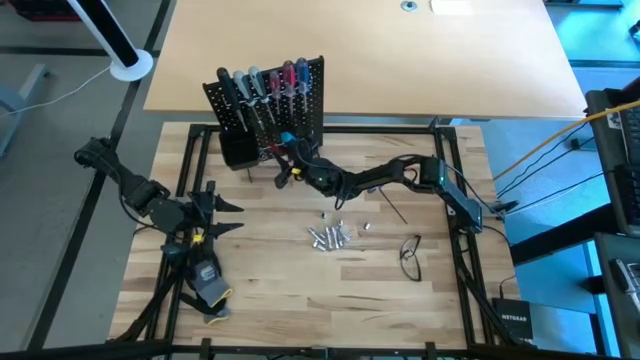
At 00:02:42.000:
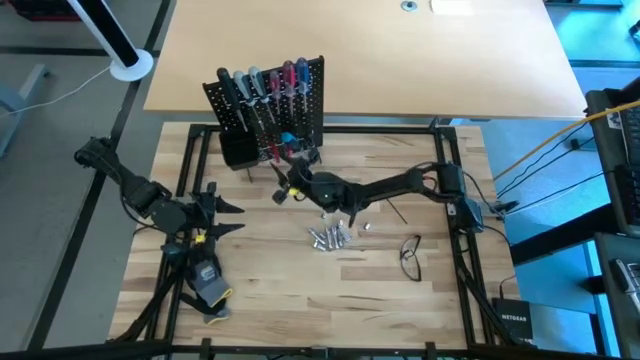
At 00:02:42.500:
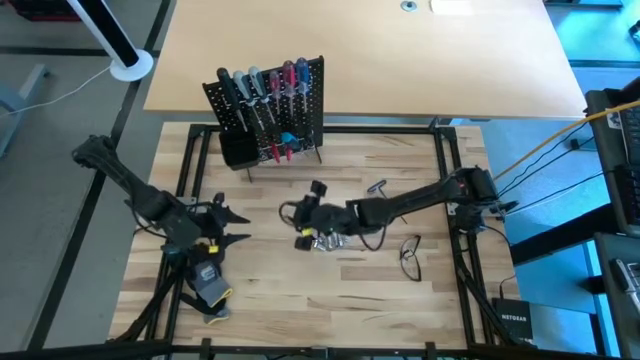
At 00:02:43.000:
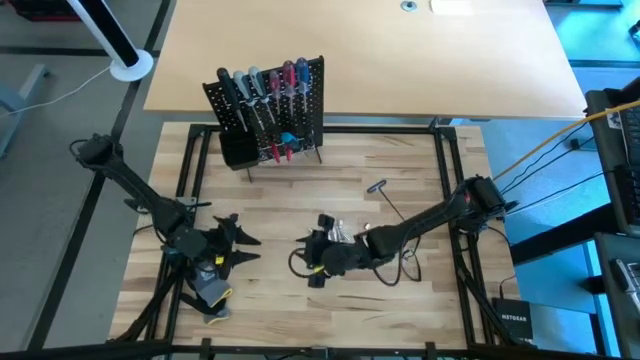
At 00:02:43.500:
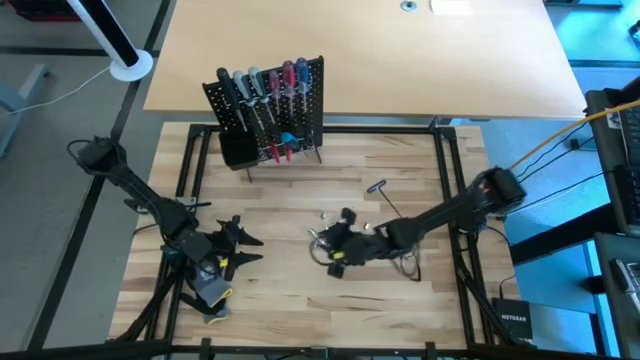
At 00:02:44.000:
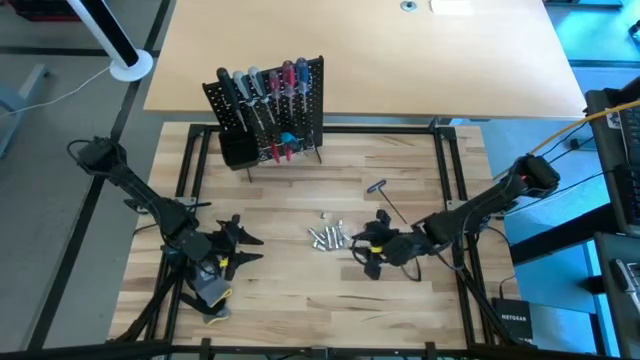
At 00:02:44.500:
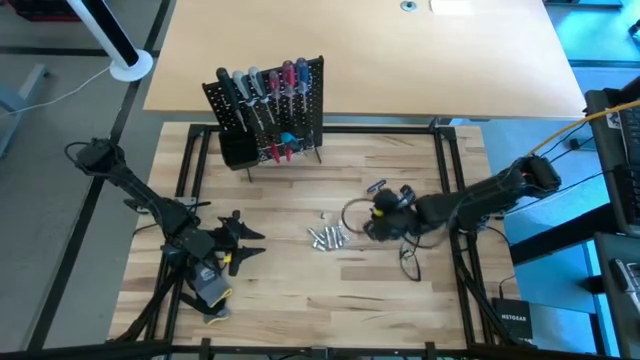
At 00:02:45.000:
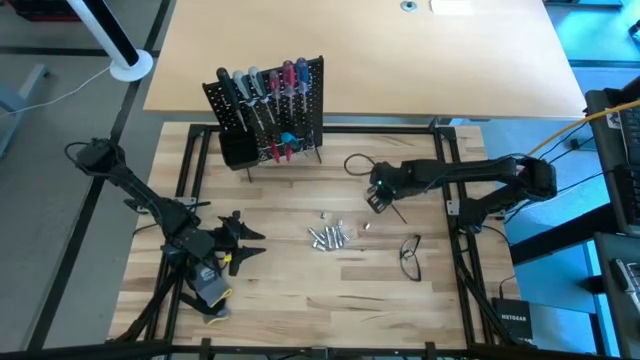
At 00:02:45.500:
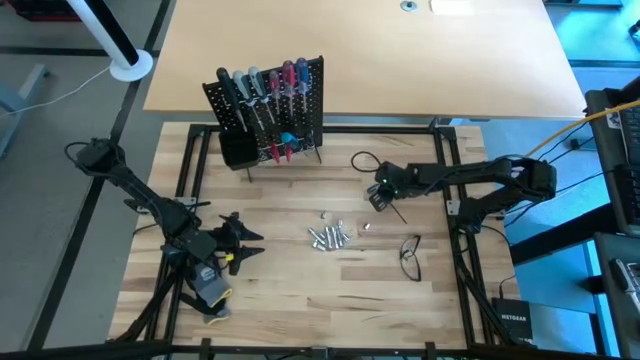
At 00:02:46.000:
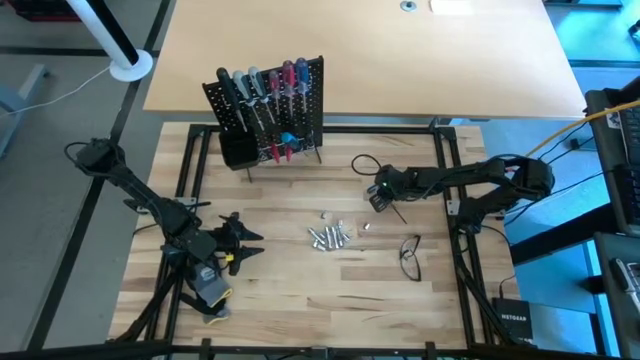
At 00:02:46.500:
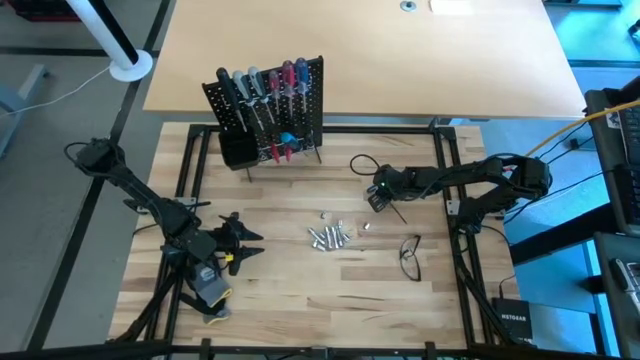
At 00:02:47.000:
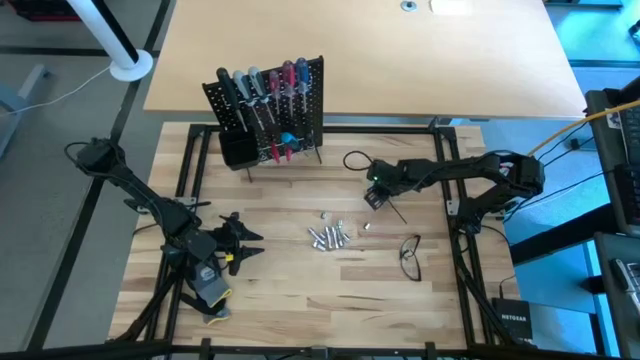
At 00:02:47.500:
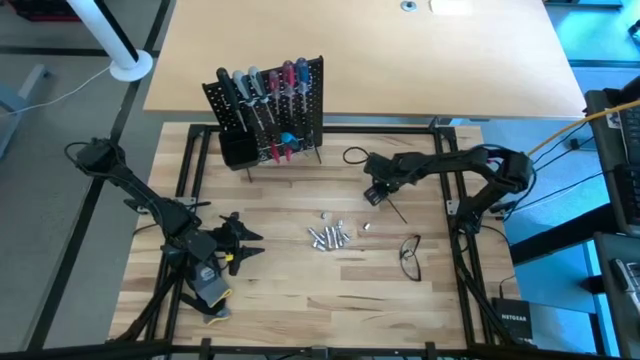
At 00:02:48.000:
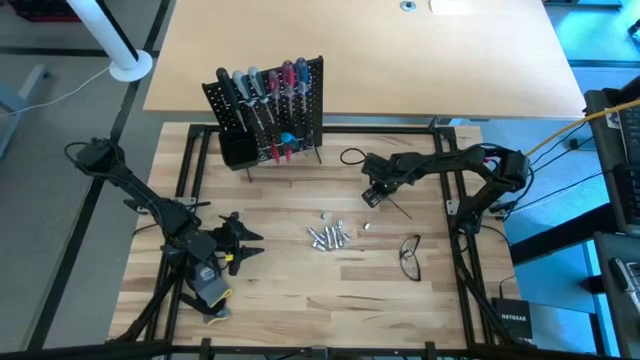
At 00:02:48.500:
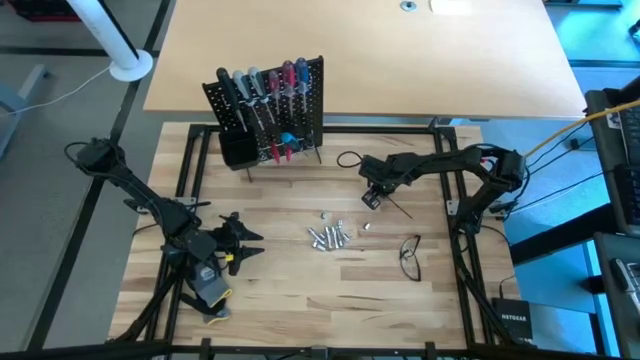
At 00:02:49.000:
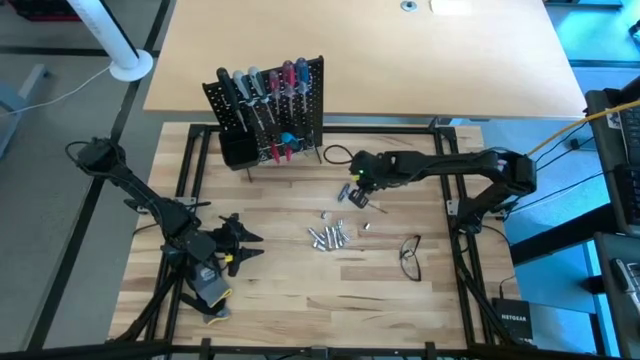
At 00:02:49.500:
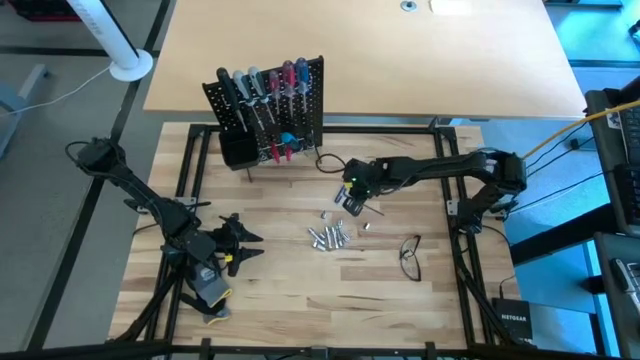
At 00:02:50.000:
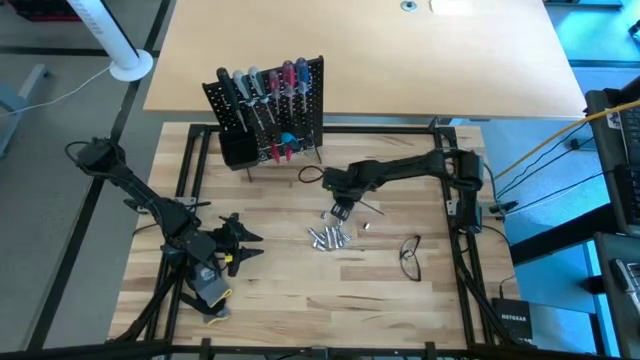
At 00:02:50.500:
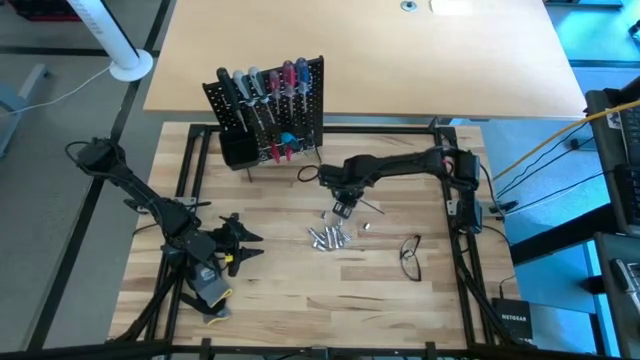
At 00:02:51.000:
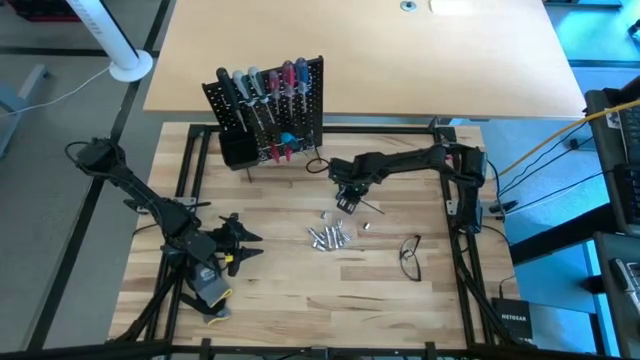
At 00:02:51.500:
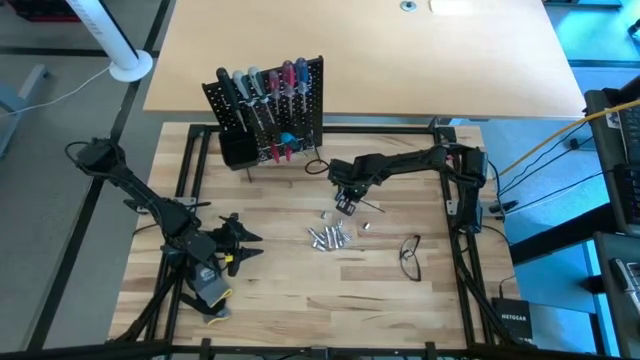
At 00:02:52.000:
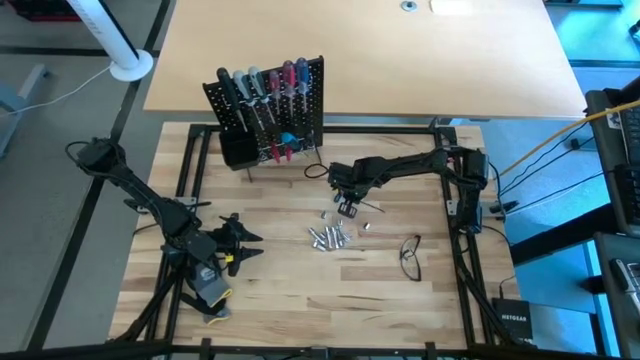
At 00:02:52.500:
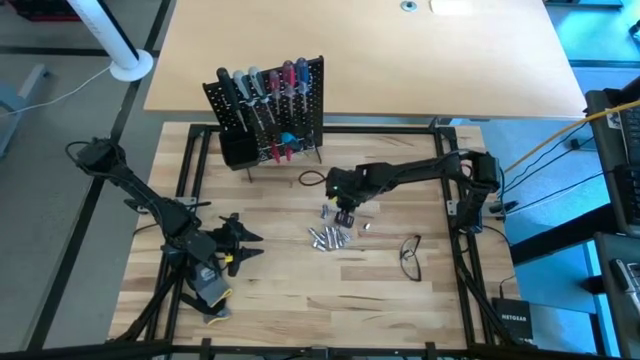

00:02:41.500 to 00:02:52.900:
Task: Hang tools onto peg board
Hang the blue pick tool onto the peg board

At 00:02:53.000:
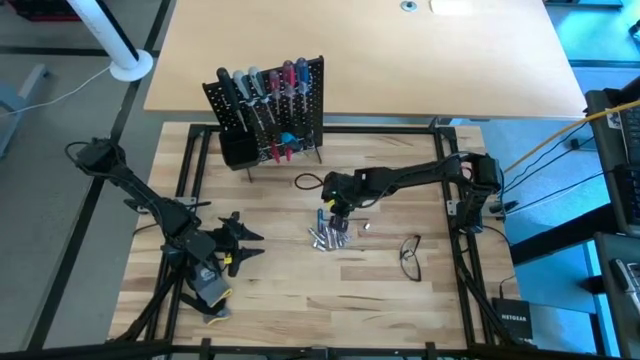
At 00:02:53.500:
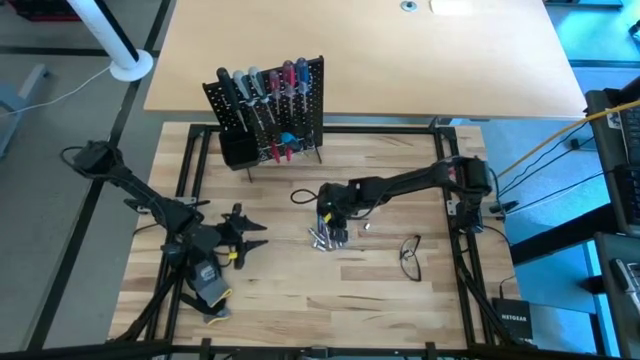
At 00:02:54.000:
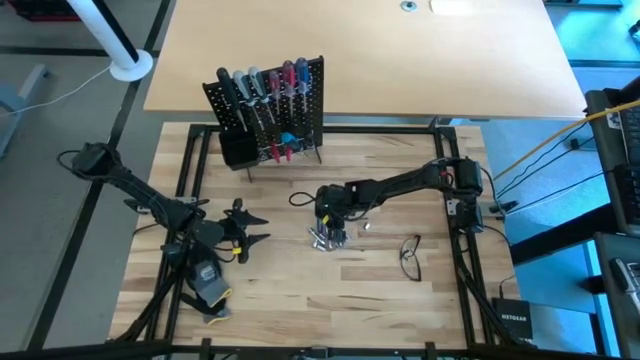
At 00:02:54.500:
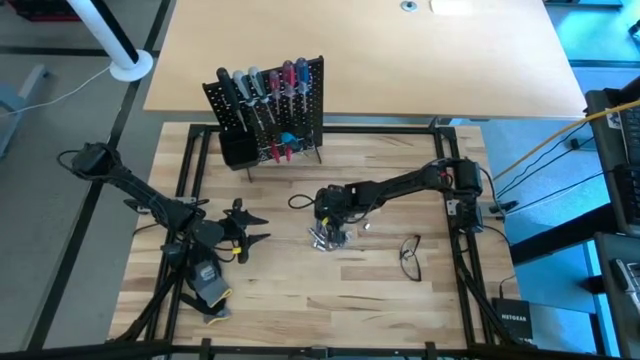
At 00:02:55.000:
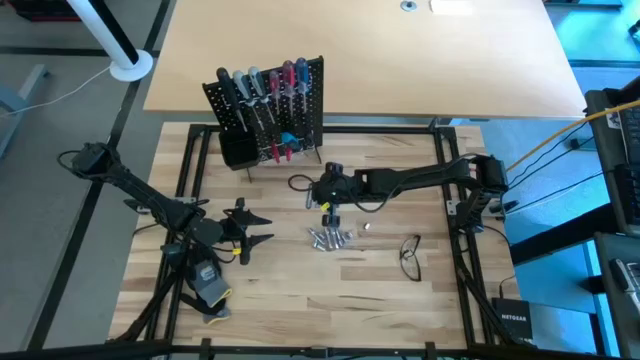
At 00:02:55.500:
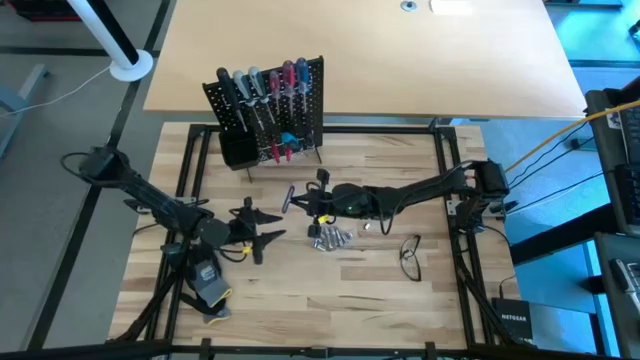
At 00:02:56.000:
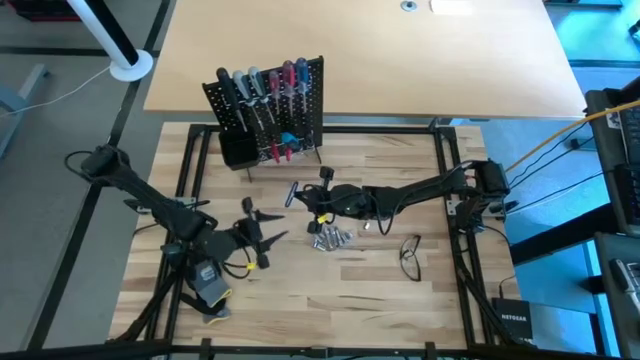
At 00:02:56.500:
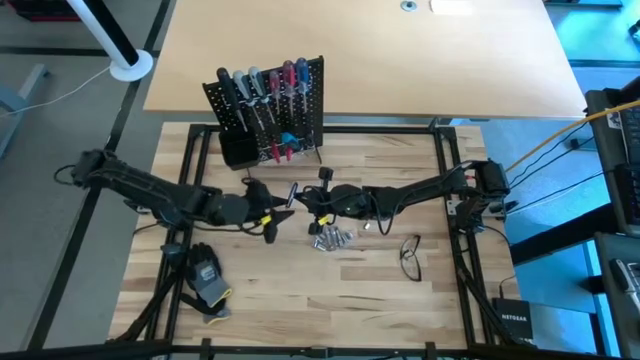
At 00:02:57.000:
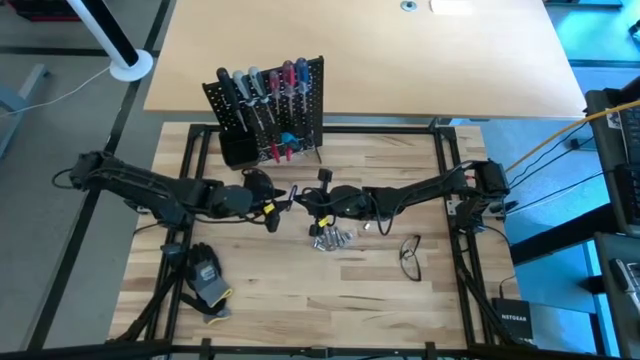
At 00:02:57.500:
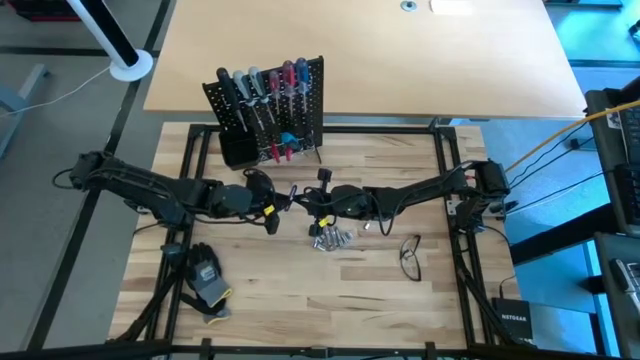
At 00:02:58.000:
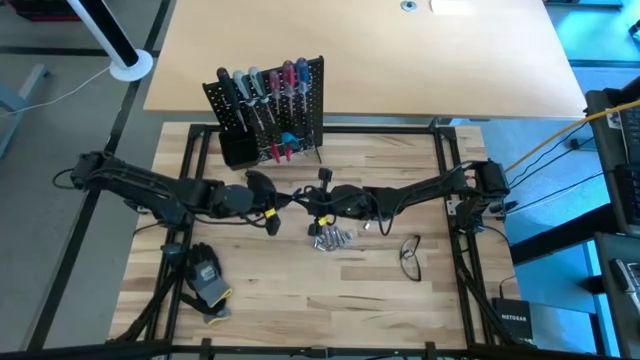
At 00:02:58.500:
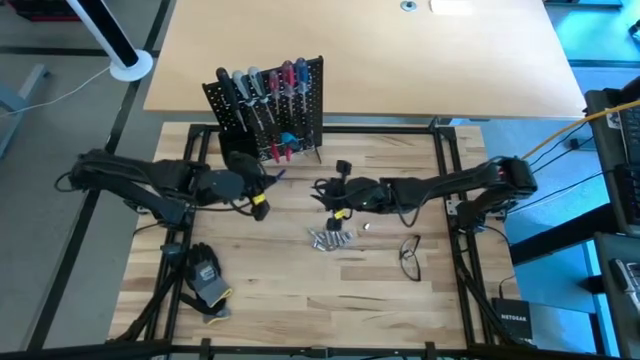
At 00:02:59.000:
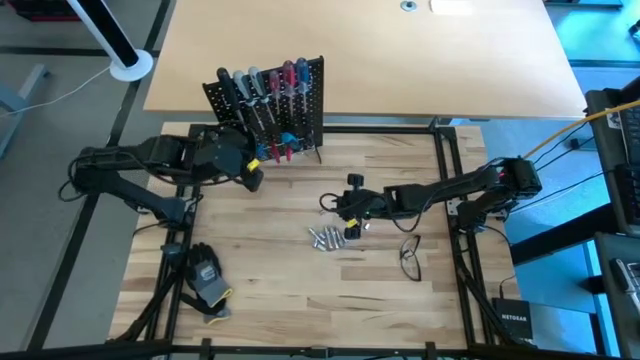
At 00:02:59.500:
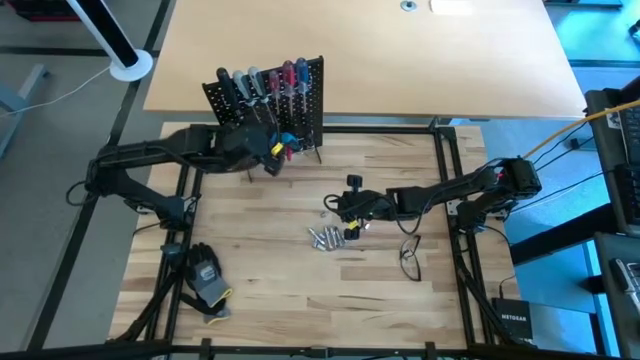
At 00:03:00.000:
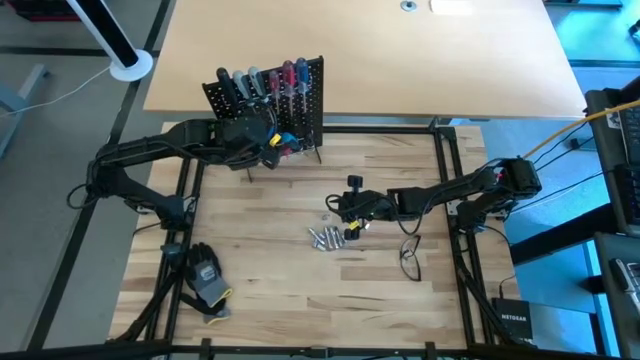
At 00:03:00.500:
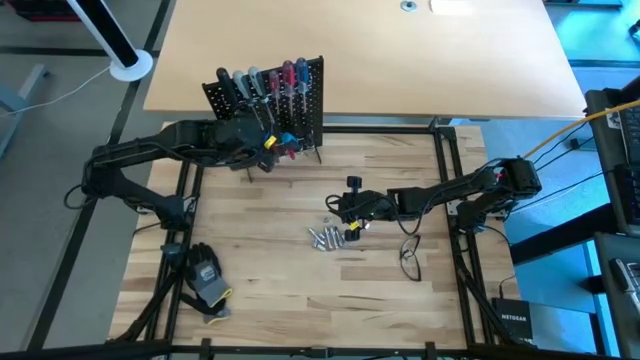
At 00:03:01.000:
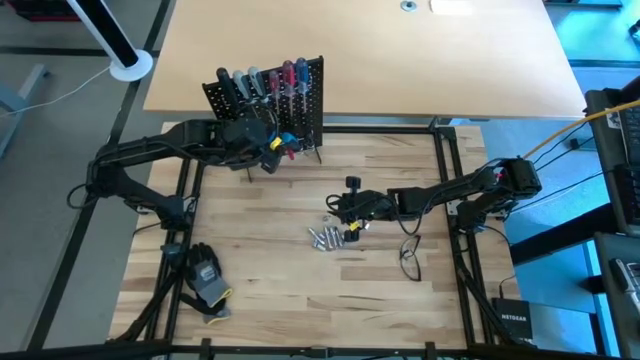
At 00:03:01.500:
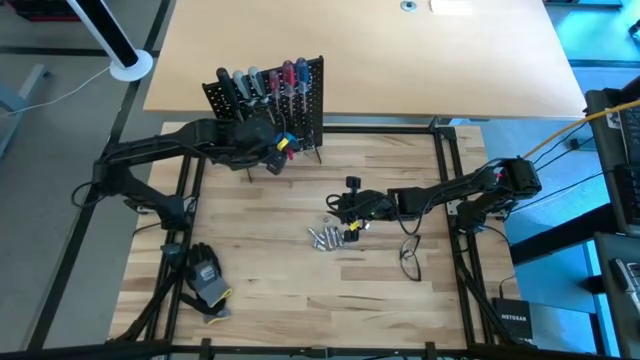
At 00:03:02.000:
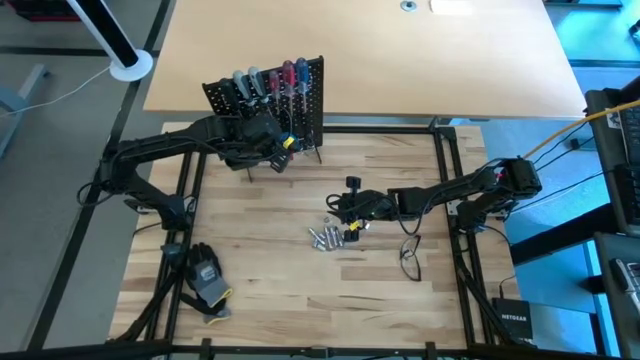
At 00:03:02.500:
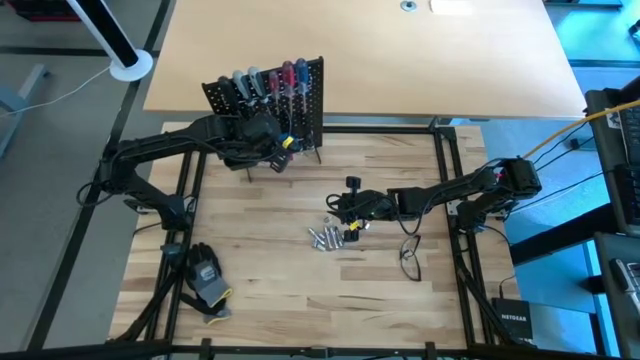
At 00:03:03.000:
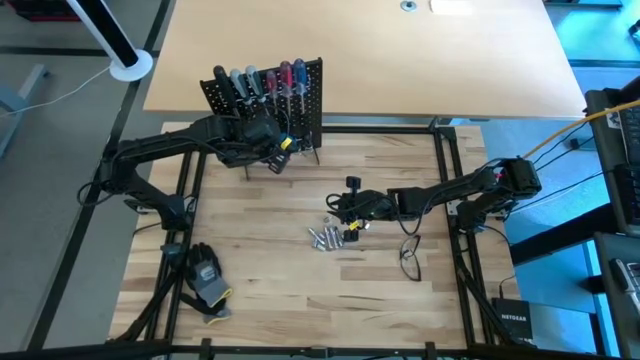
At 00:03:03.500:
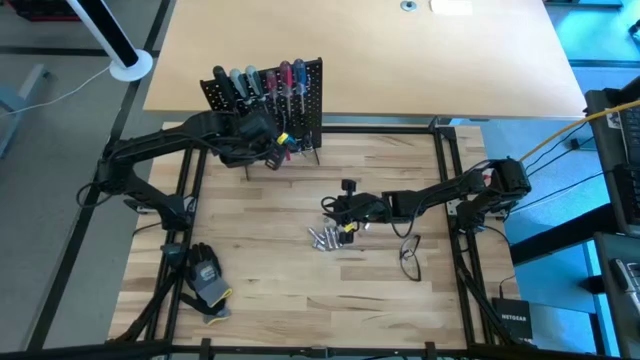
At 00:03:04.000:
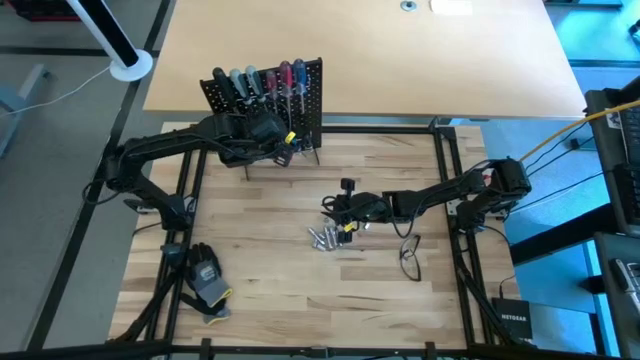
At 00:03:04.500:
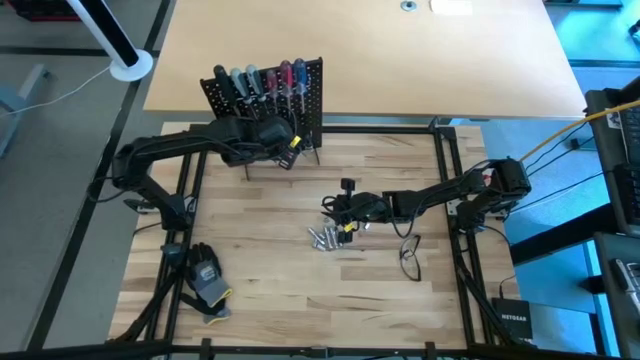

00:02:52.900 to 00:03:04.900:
Hang the blue pick tool onto the peg board
